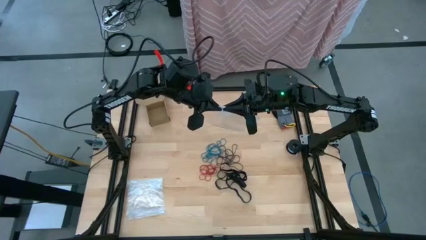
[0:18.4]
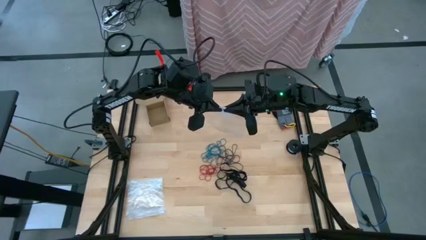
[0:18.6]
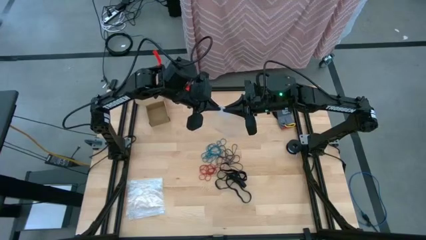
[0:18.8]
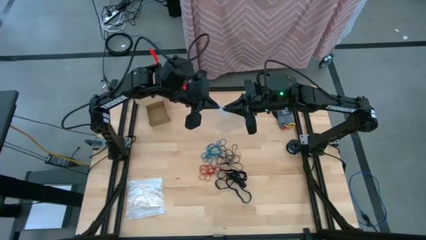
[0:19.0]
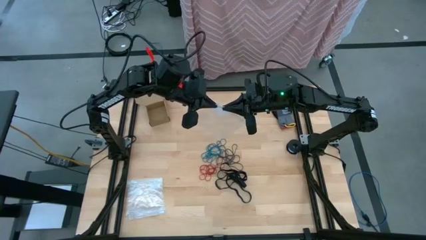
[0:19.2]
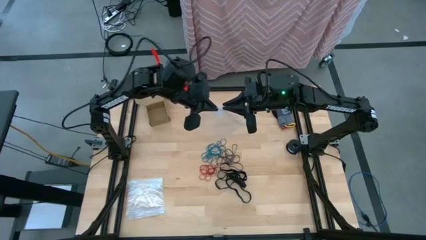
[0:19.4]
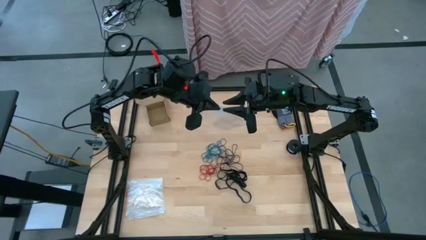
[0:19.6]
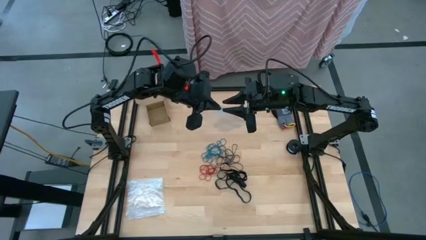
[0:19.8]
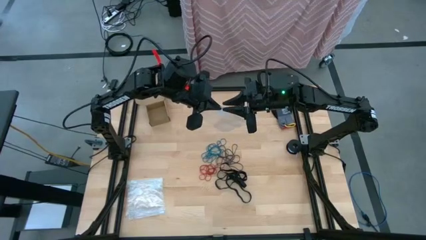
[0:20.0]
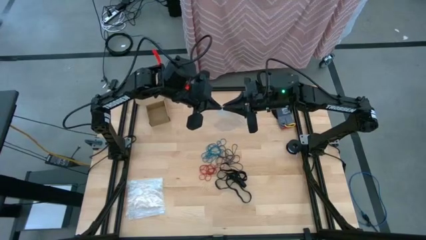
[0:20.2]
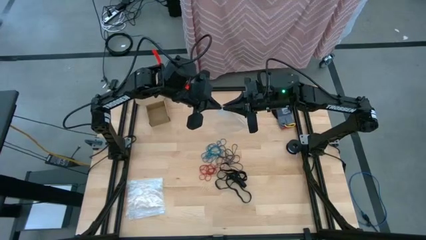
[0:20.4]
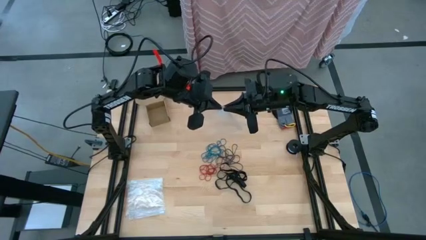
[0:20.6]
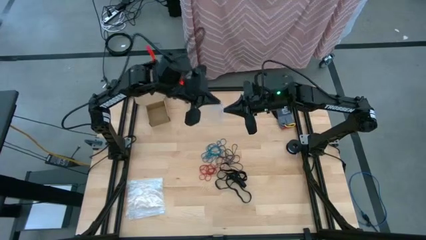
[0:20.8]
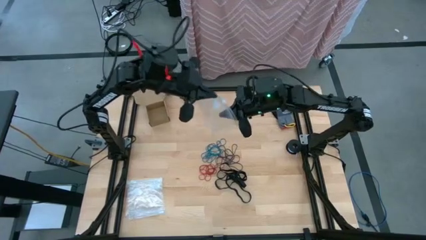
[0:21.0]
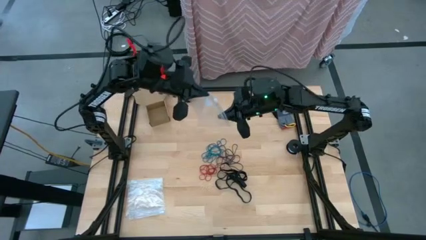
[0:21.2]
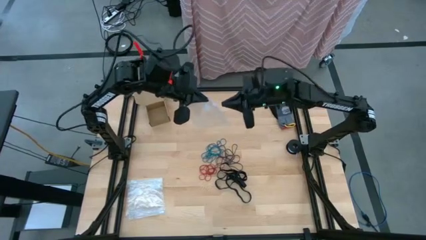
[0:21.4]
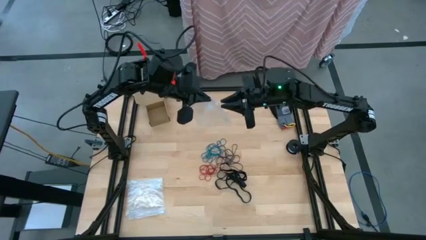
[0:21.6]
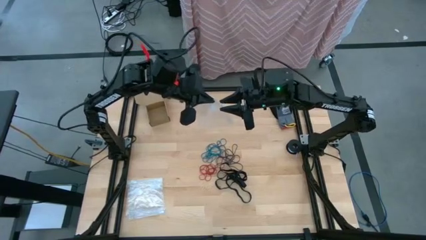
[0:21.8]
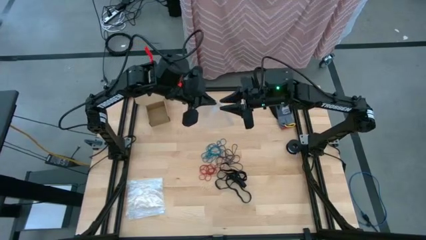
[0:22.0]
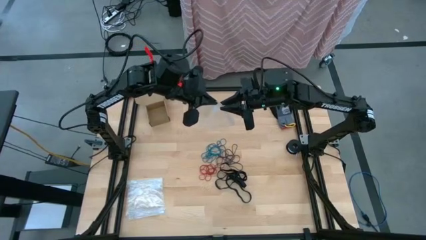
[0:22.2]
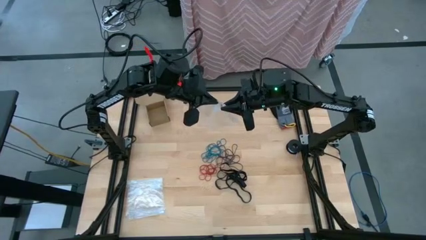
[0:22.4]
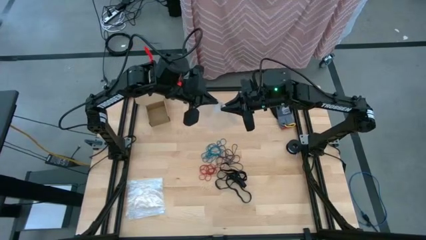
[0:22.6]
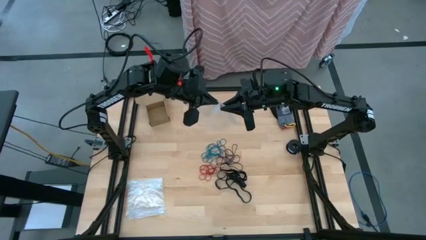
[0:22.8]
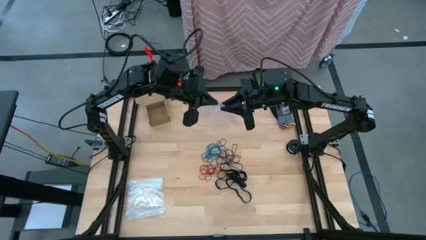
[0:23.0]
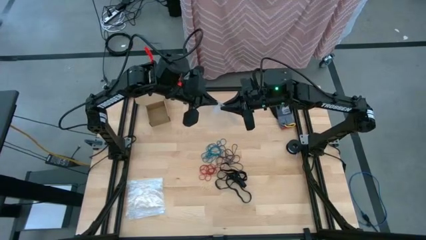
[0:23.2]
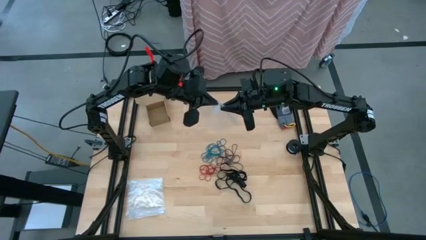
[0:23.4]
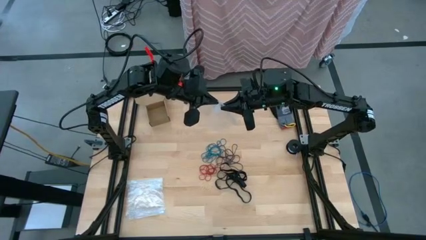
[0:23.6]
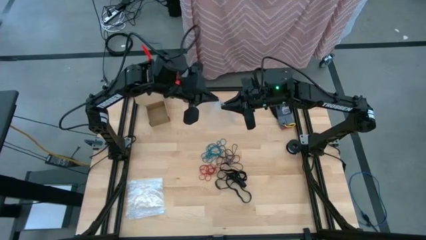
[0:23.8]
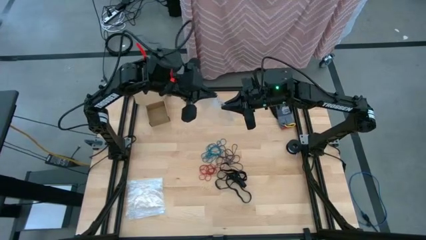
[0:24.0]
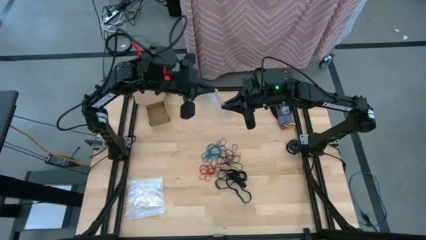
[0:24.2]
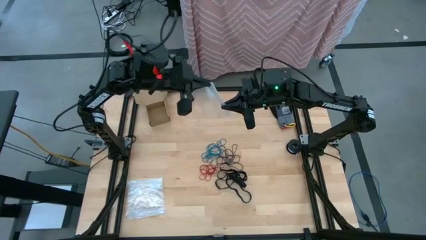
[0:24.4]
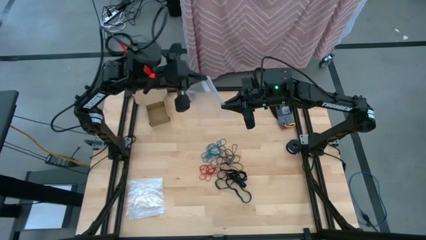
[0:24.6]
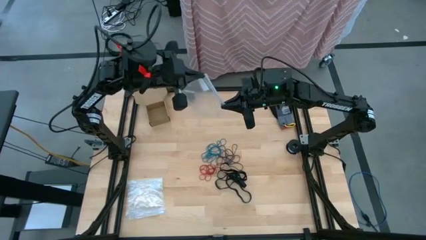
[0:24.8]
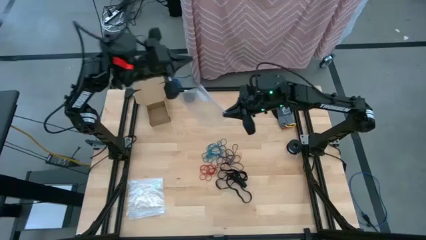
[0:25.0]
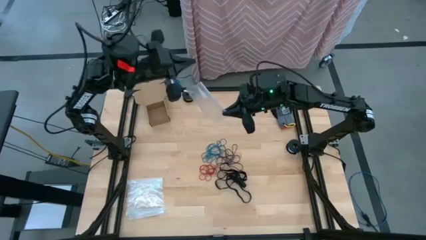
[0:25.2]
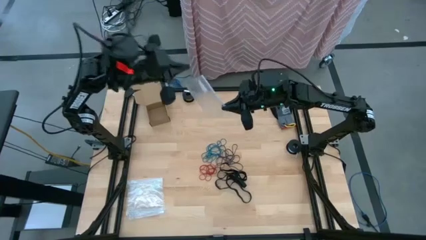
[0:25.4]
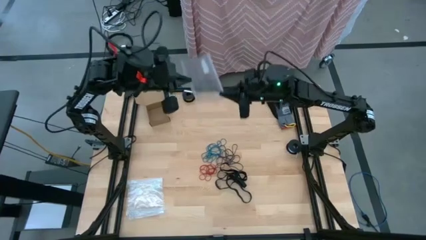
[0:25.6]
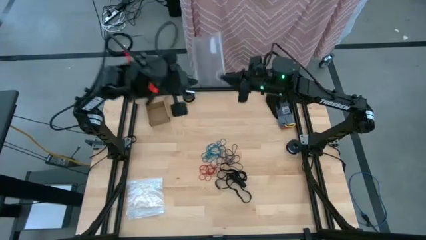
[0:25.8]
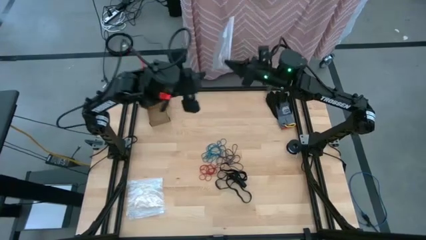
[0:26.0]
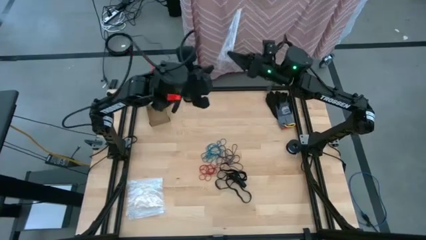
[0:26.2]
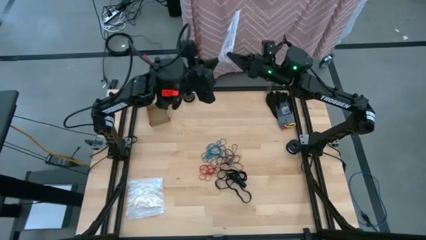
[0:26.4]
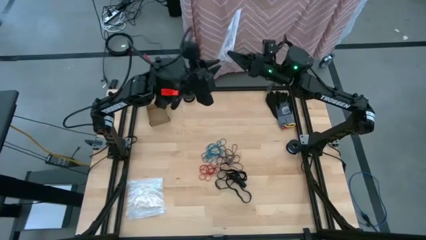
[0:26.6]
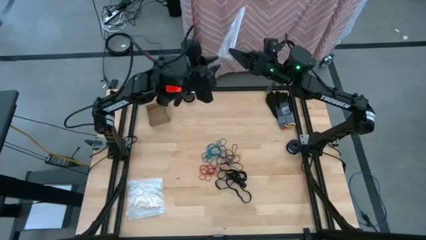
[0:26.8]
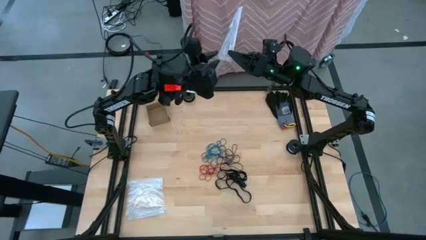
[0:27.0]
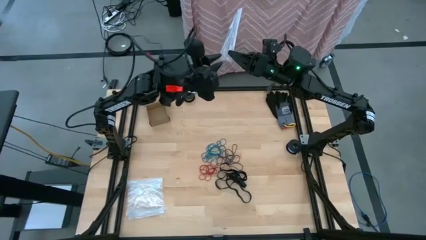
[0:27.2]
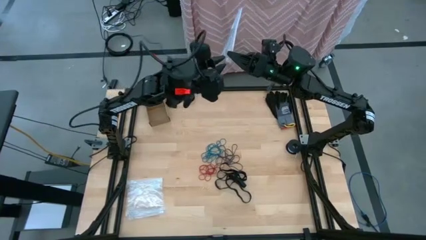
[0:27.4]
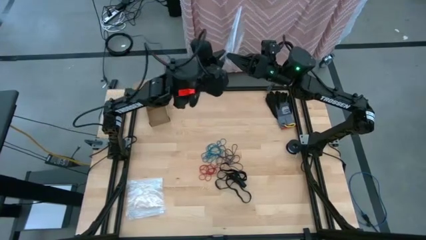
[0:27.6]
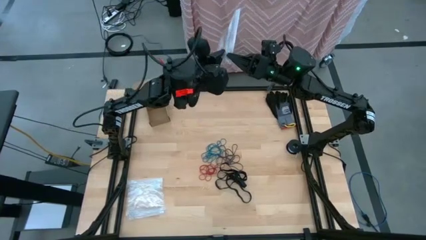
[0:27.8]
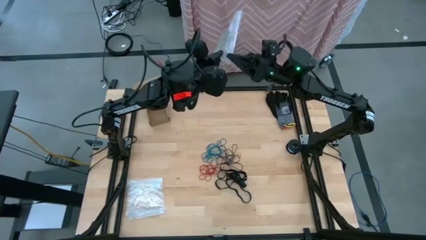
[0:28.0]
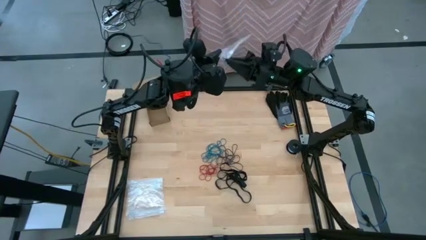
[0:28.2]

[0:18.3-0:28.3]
Task: Sort rubber bands
Close the transparent zip bag

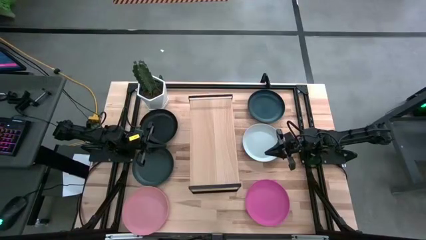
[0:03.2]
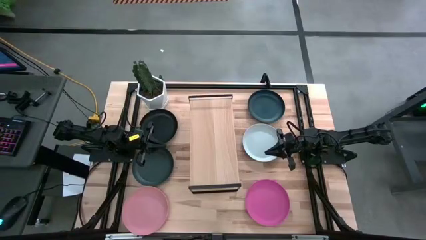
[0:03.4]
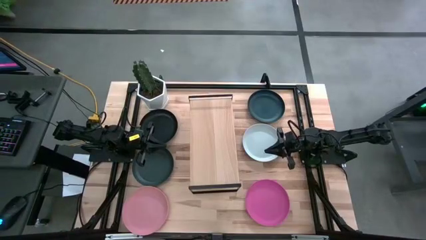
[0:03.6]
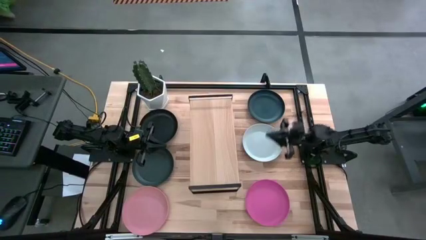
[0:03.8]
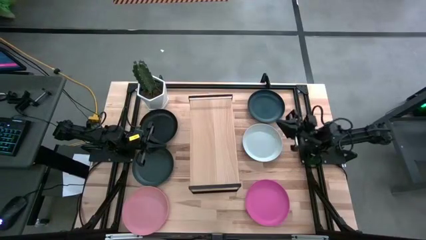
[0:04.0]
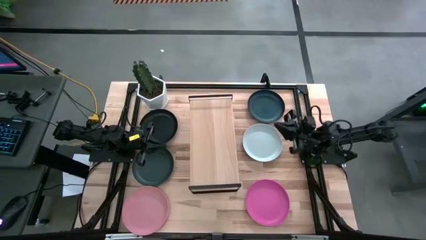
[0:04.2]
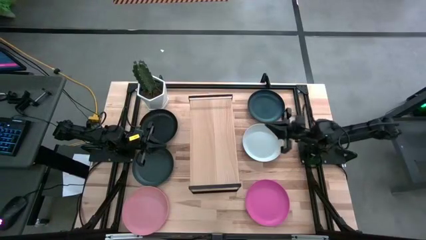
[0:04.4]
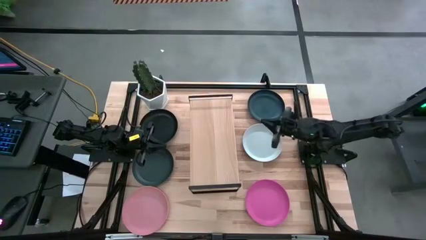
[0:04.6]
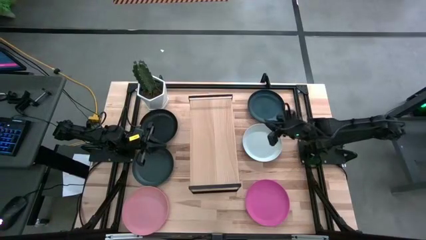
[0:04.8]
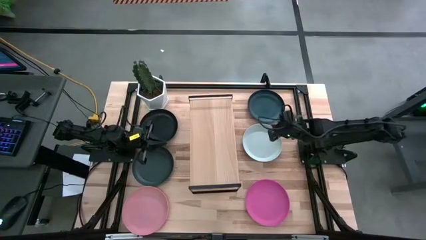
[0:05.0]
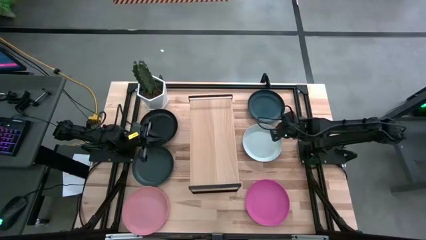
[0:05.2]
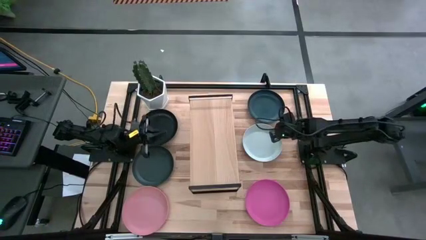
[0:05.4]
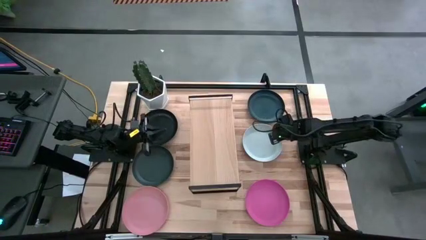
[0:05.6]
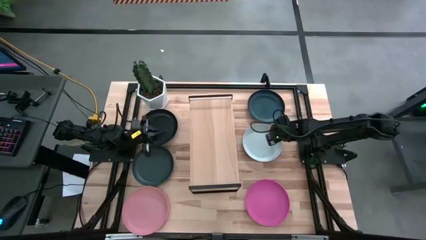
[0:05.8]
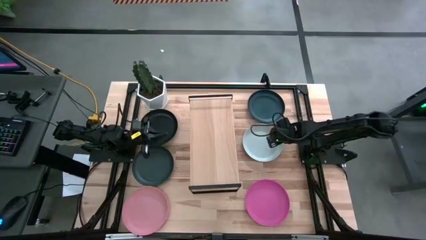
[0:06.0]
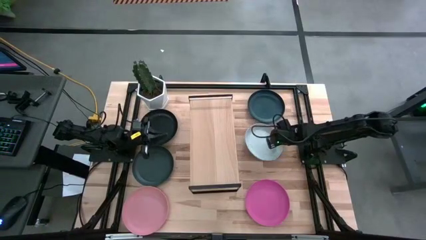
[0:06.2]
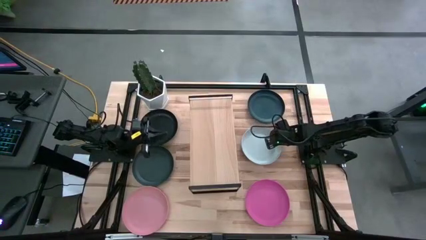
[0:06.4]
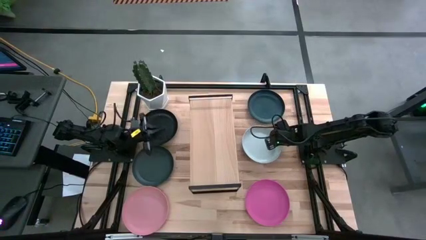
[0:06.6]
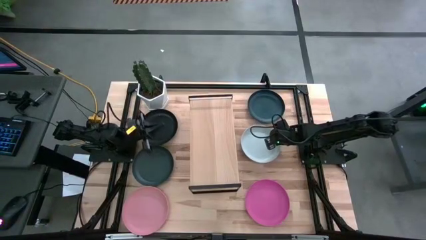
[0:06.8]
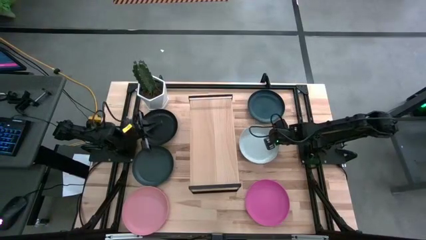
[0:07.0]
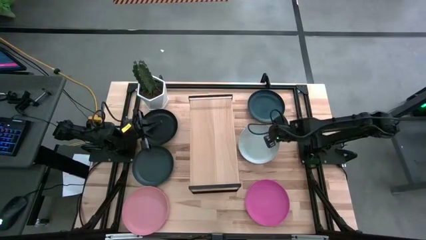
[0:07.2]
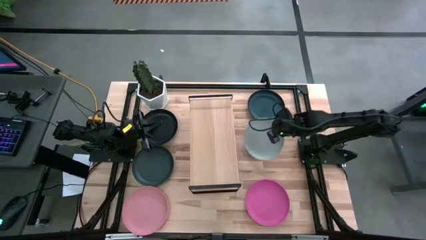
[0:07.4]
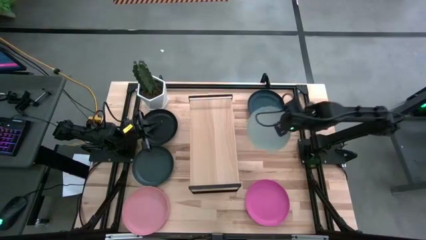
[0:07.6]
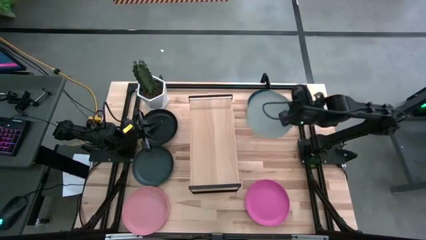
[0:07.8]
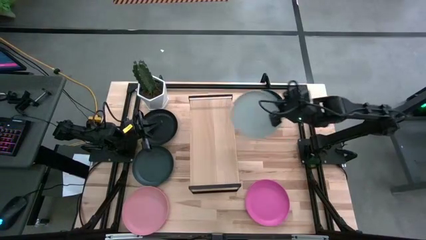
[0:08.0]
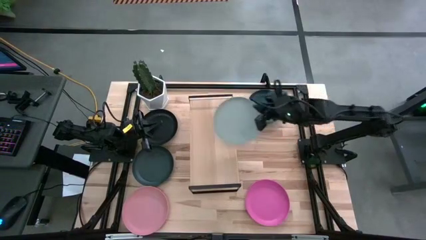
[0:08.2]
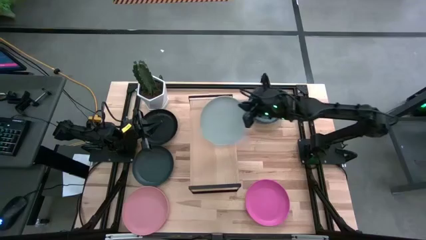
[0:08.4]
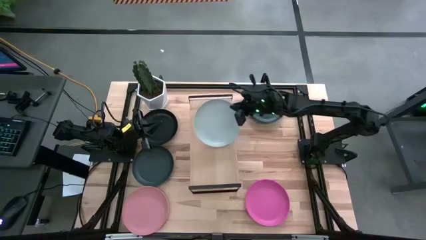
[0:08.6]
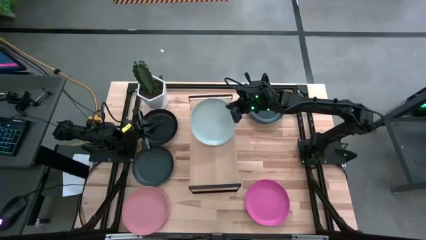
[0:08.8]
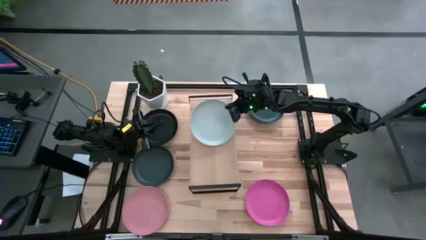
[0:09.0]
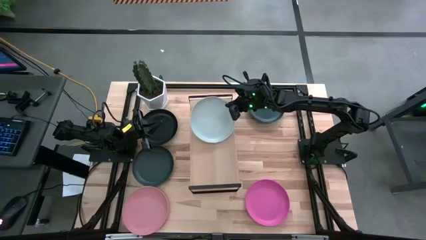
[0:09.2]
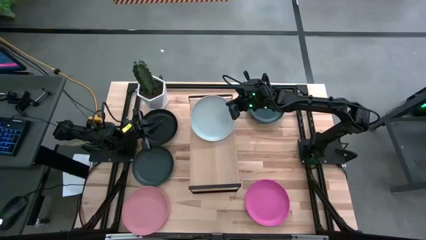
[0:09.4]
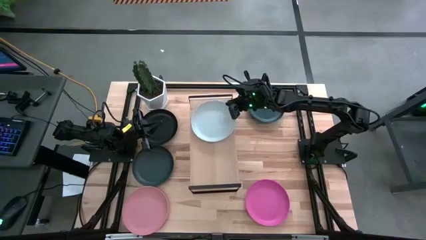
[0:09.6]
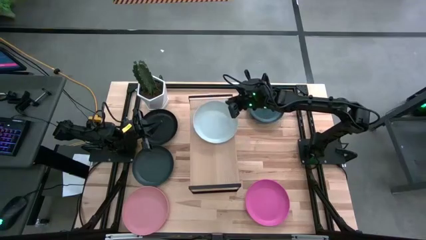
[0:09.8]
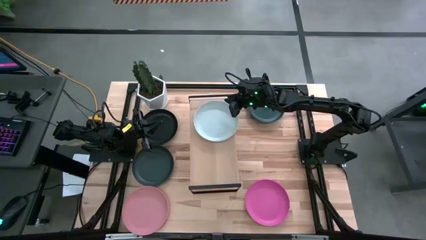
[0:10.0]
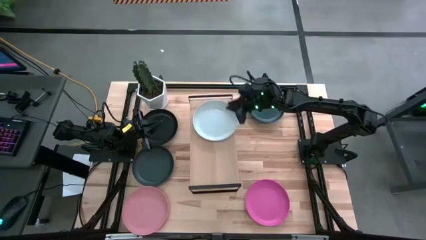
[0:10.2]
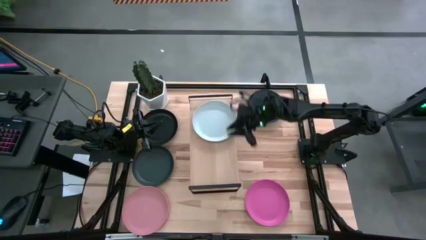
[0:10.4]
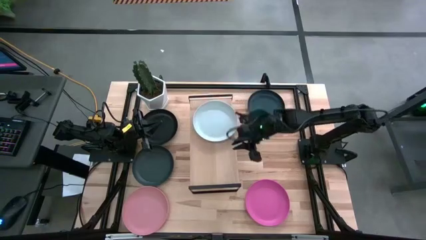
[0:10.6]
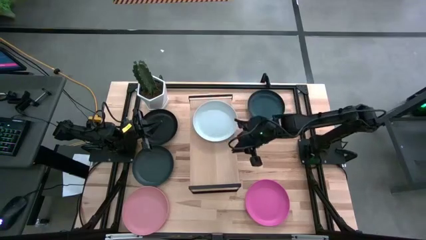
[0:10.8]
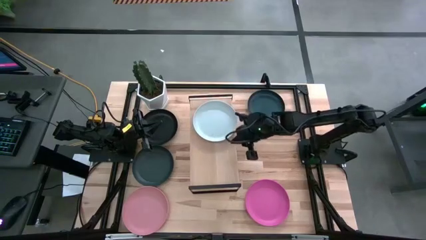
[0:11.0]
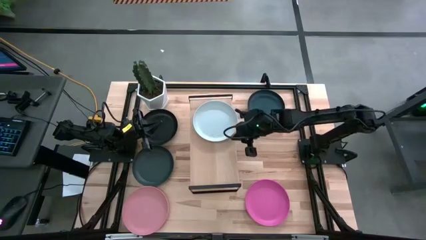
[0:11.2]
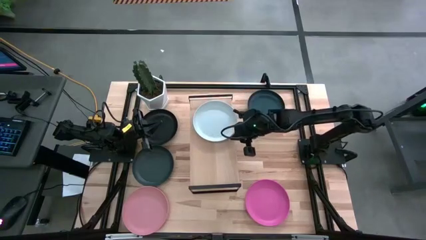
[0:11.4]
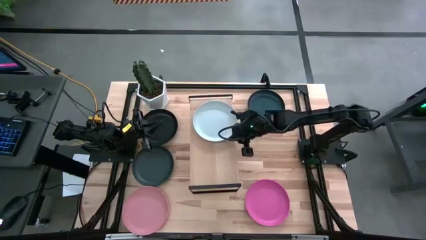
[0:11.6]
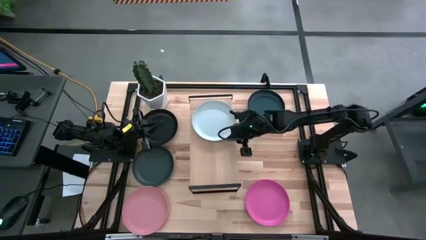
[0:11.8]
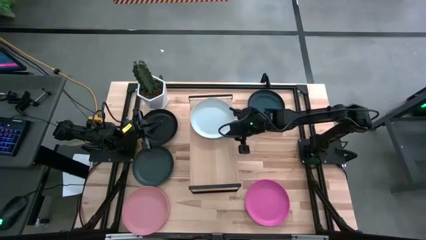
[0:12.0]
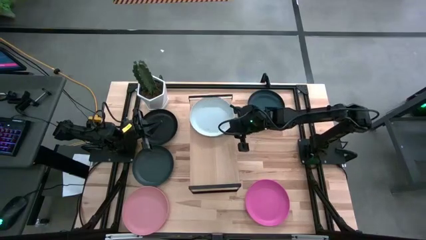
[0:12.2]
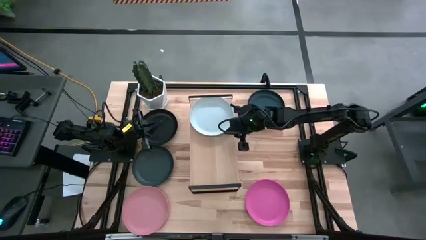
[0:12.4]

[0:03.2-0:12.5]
Task: Place and stack plates onto a shelf
Put the white plate on the shelf
